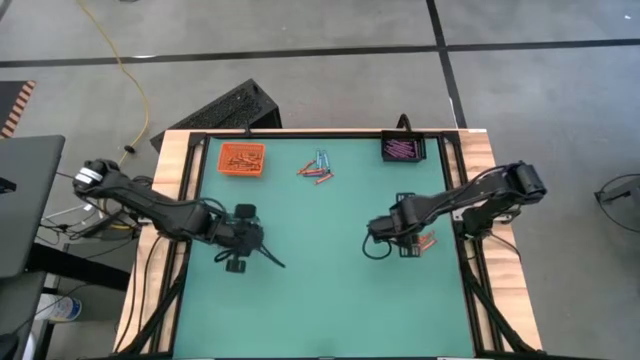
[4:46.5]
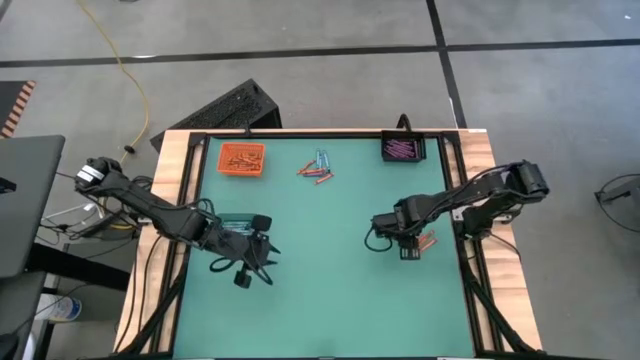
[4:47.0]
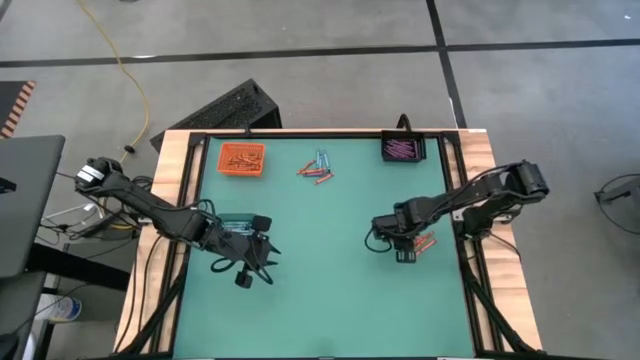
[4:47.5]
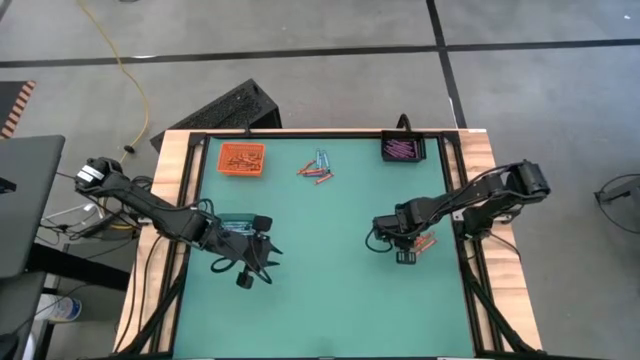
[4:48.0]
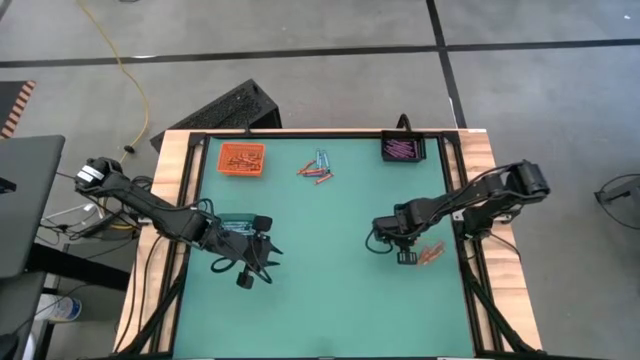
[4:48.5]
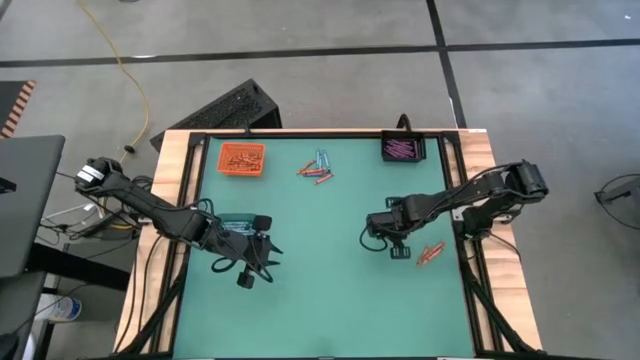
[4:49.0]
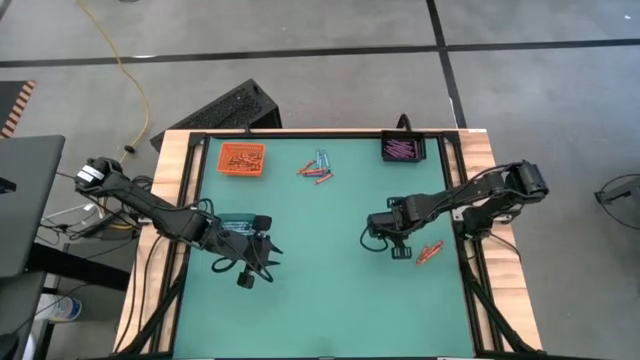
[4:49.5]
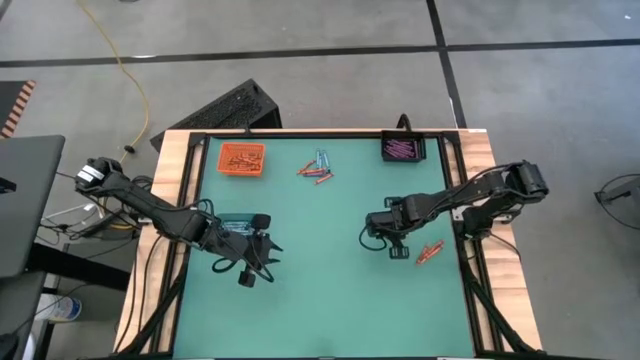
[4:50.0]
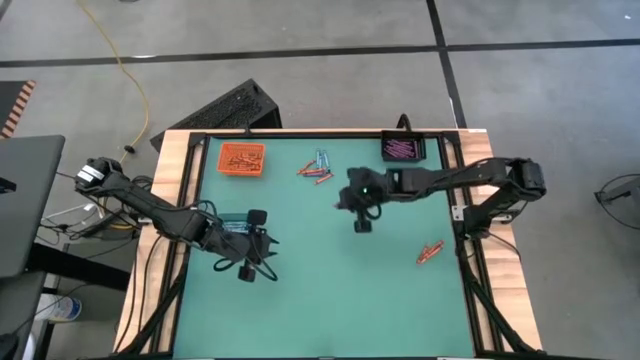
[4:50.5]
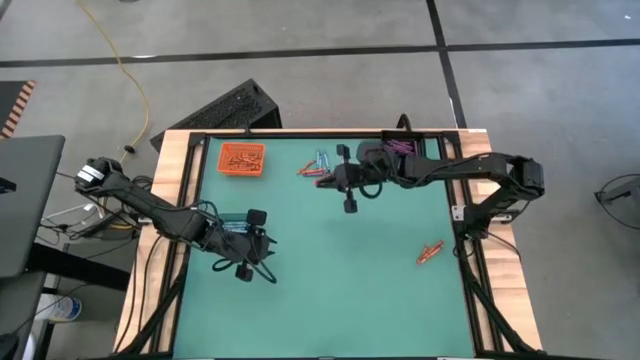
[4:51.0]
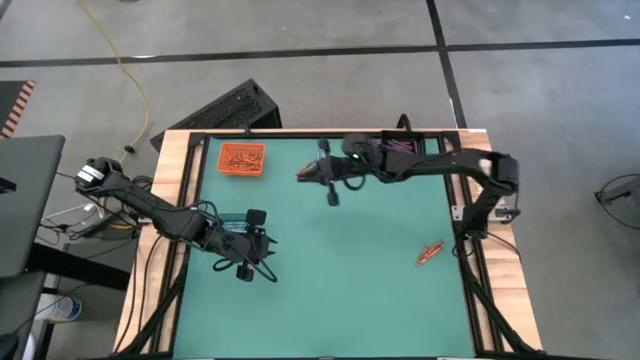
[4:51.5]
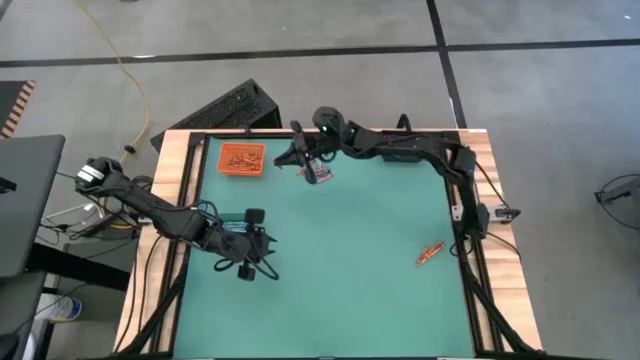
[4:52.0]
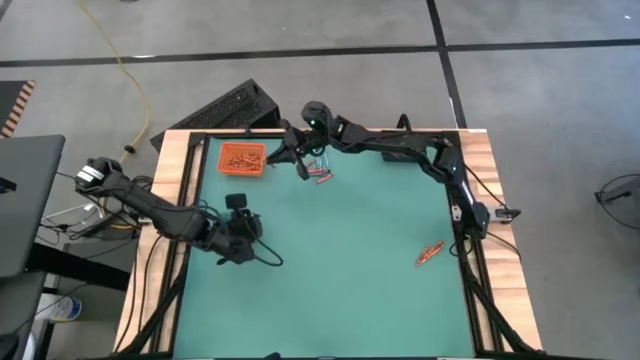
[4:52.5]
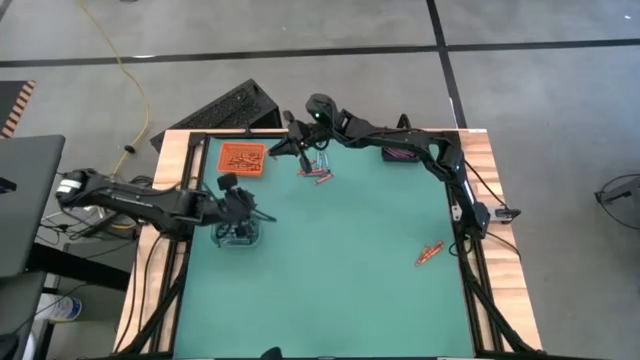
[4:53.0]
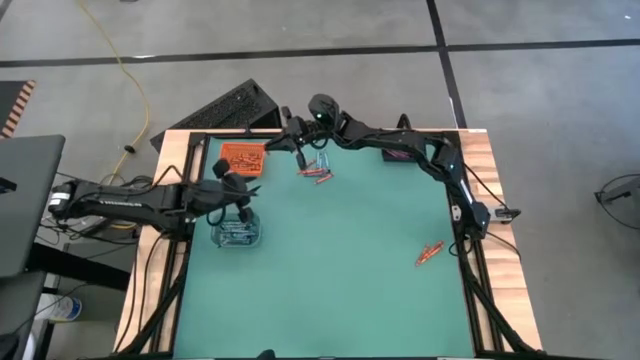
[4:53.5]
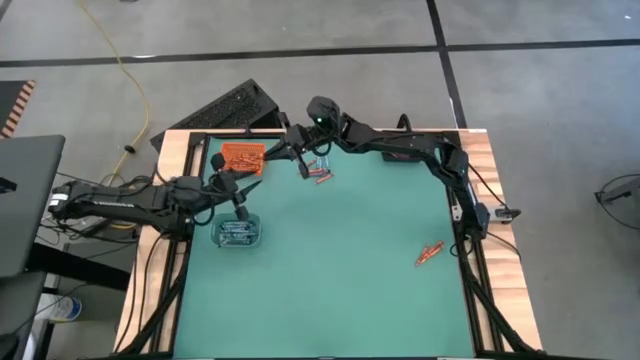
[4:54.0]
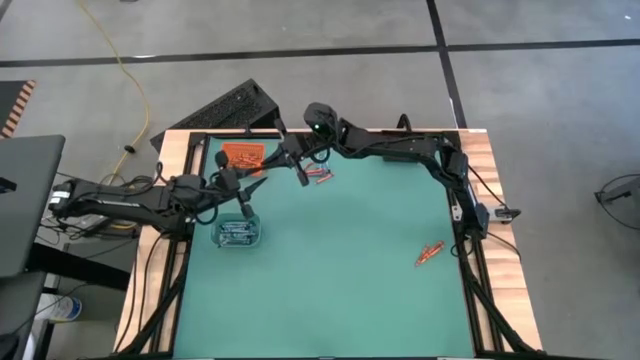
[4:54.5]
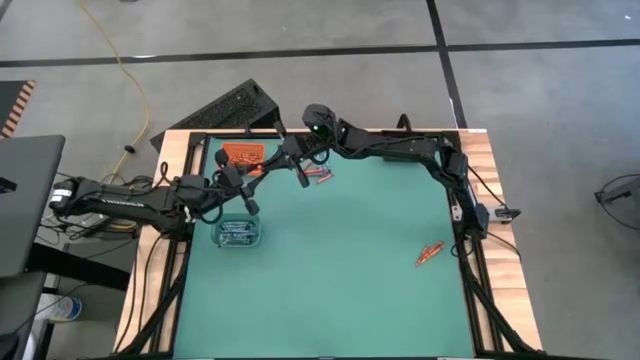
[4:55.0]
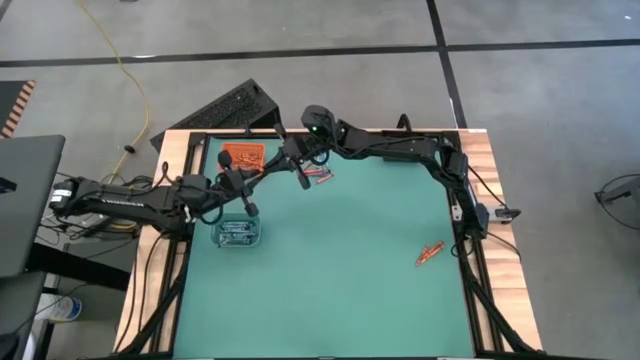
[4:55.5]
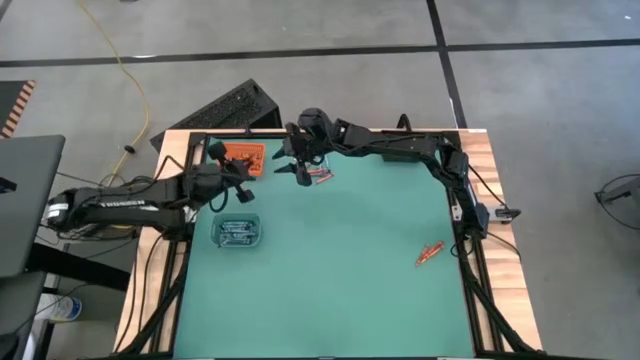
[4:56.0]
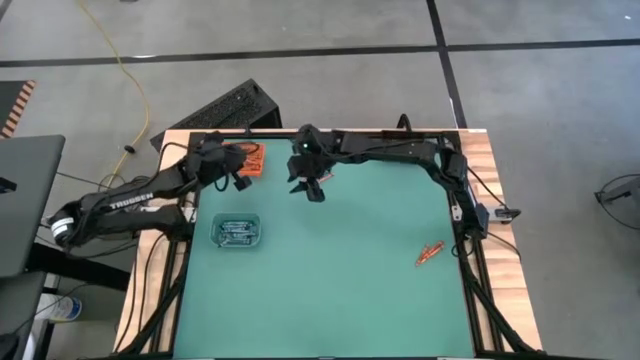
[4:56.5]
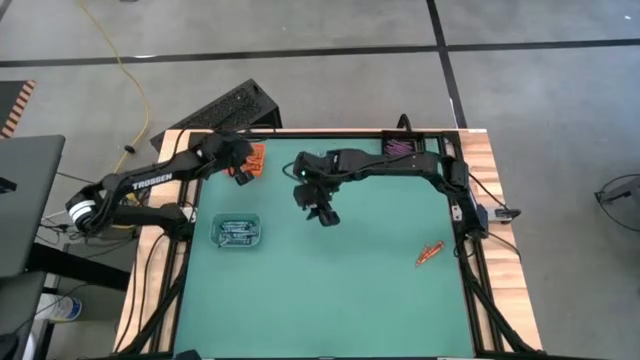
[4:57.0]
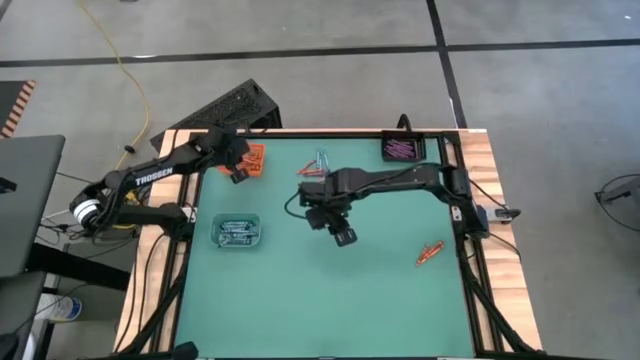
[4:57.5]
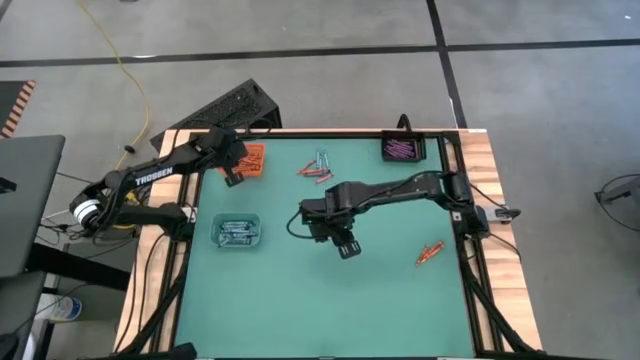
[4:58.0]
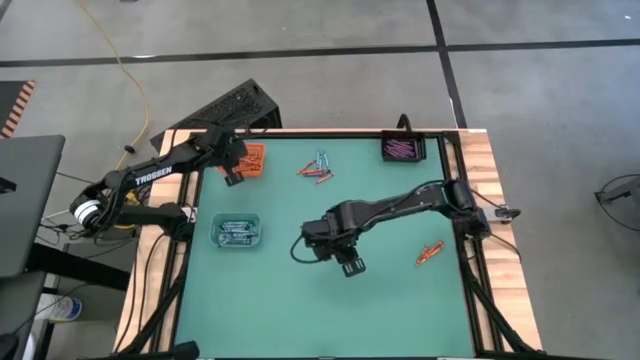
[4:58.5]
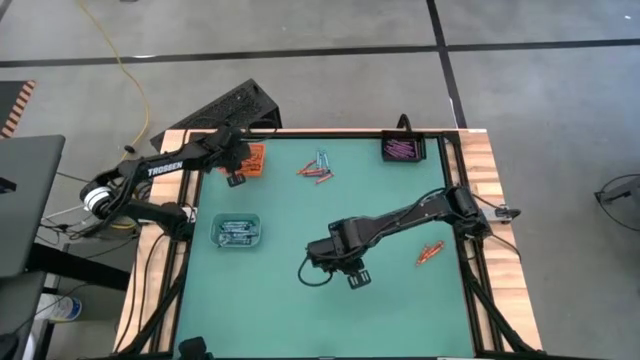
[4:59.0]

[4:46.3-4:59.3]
Task: Sort crayons
Put the orange crayon into the orange basket

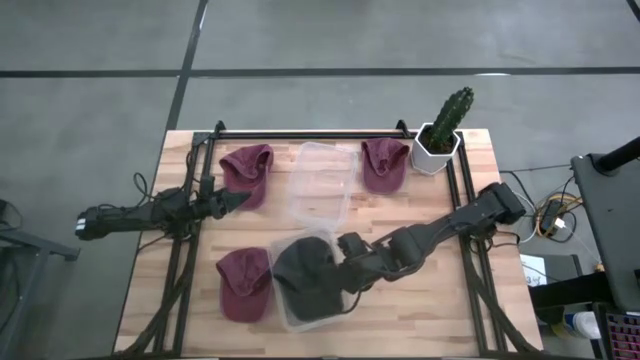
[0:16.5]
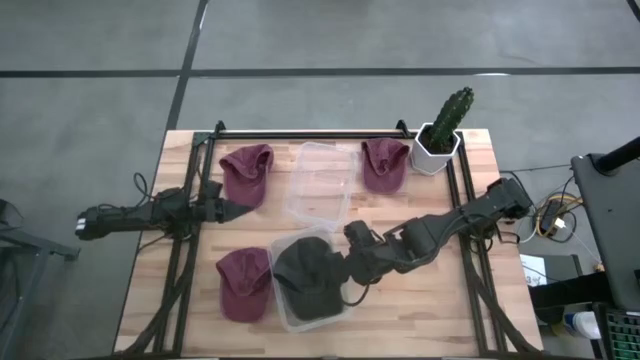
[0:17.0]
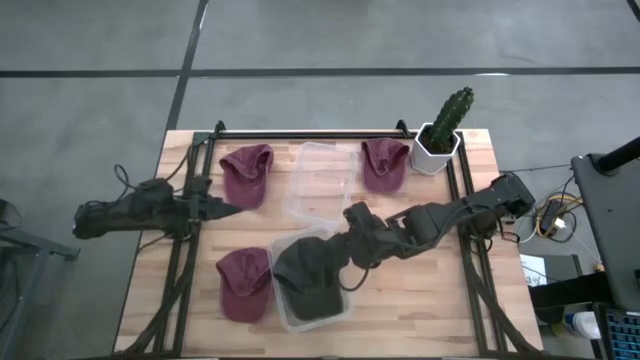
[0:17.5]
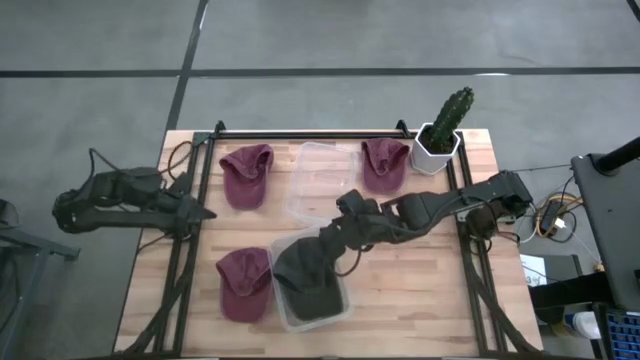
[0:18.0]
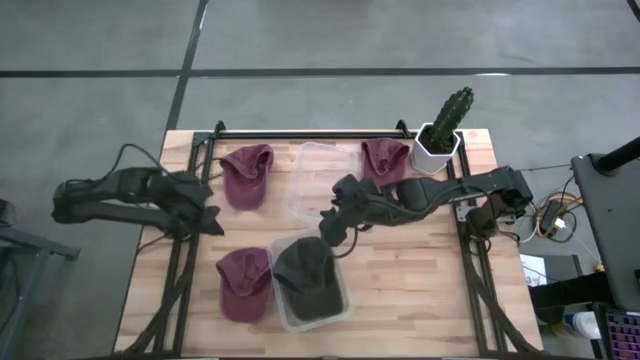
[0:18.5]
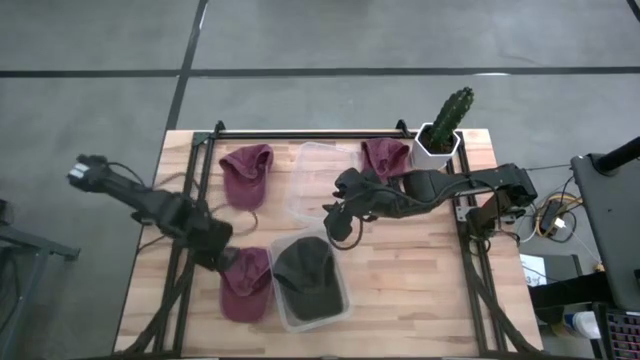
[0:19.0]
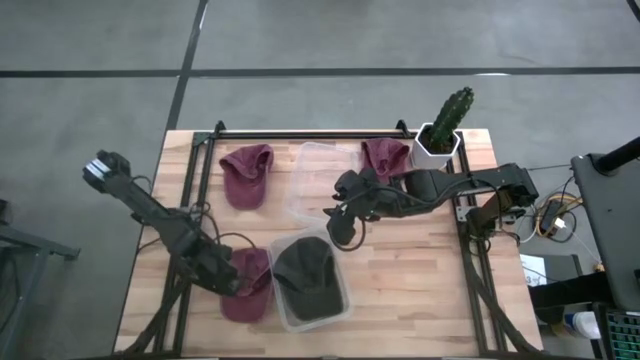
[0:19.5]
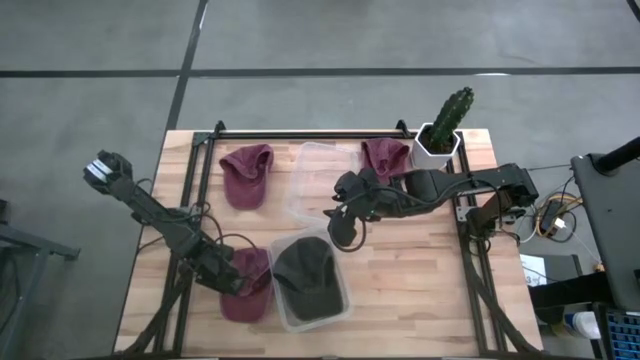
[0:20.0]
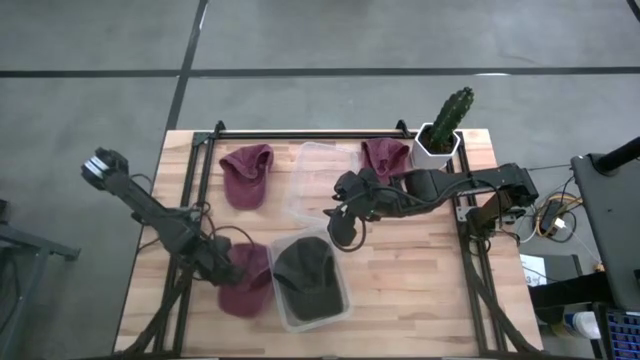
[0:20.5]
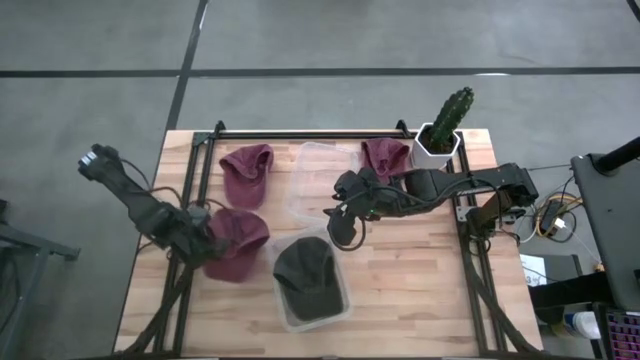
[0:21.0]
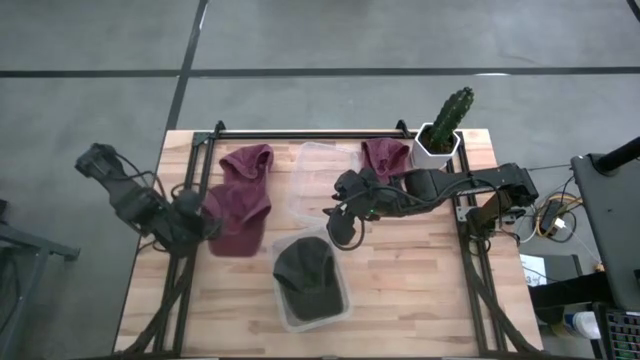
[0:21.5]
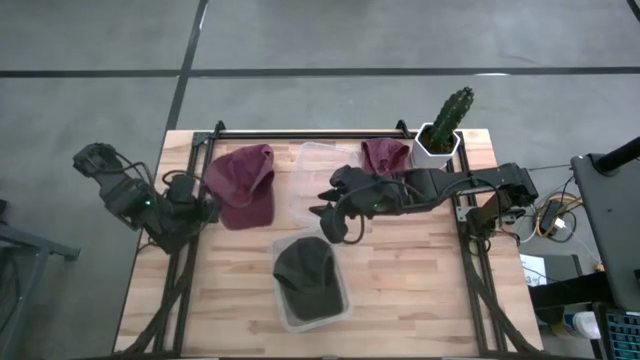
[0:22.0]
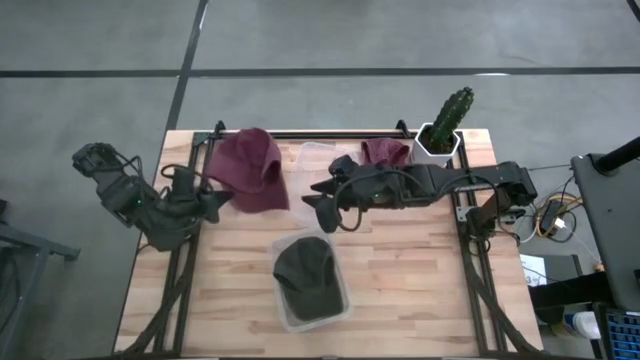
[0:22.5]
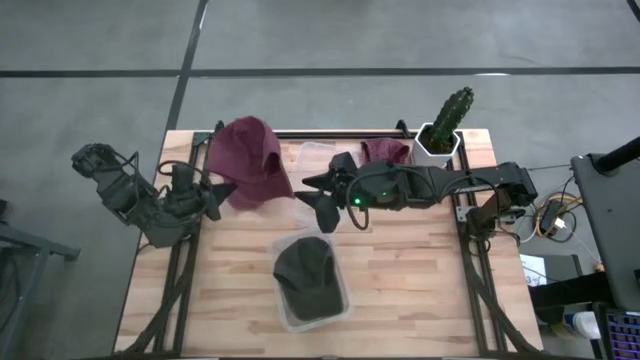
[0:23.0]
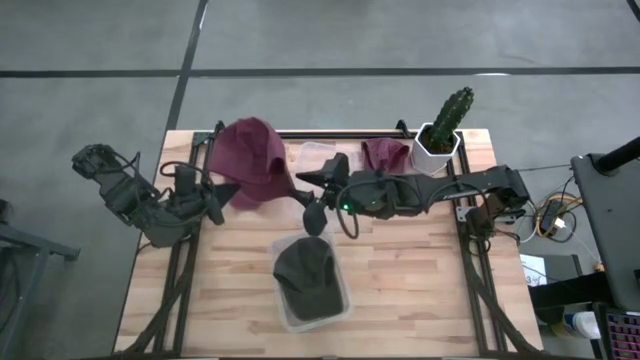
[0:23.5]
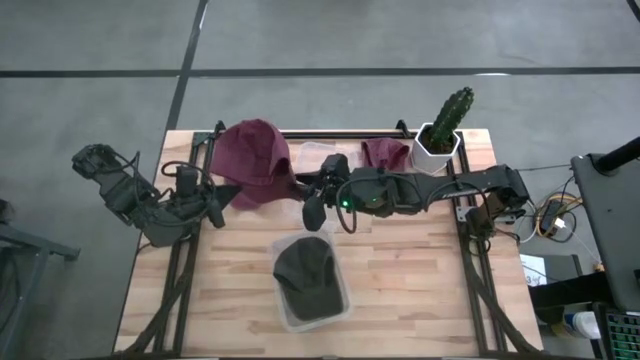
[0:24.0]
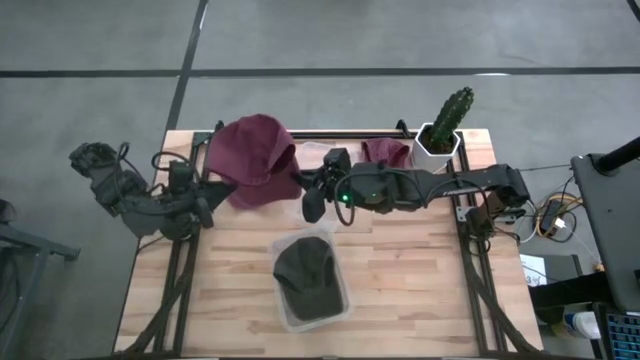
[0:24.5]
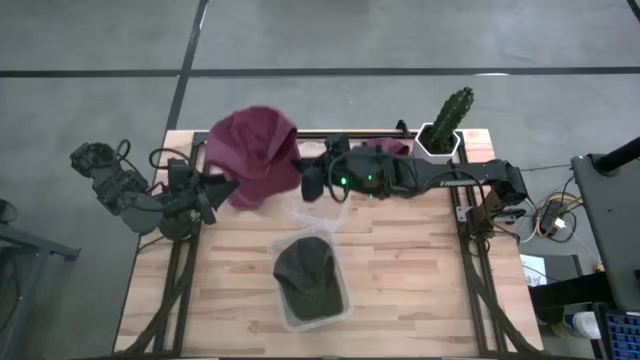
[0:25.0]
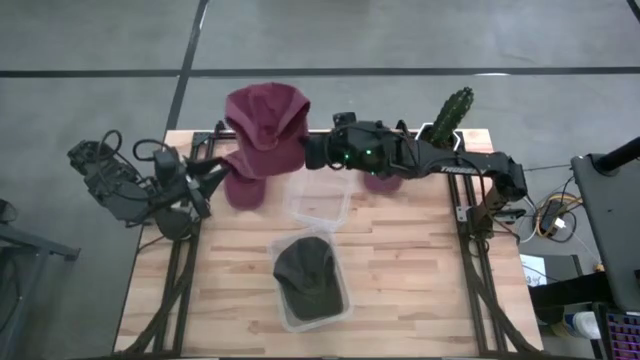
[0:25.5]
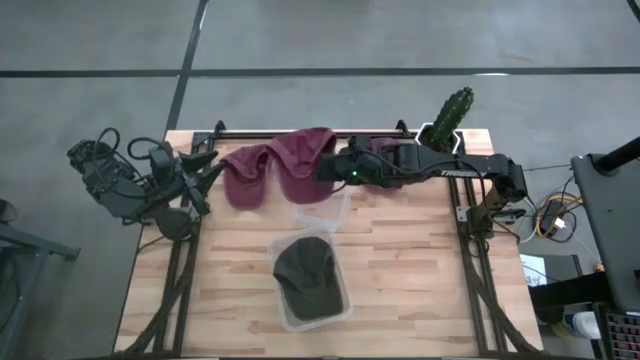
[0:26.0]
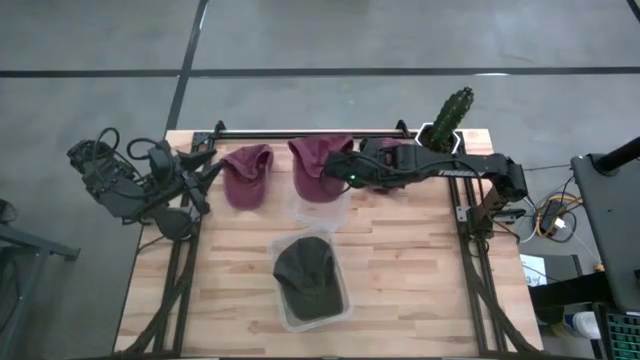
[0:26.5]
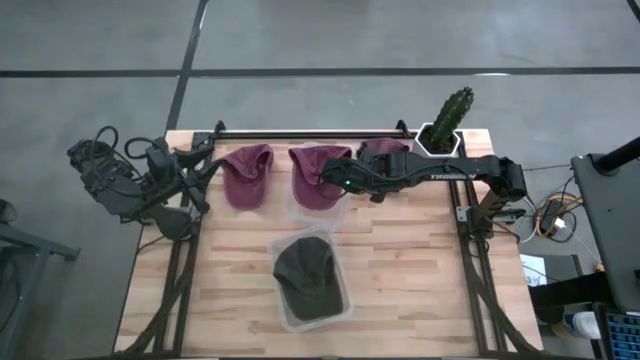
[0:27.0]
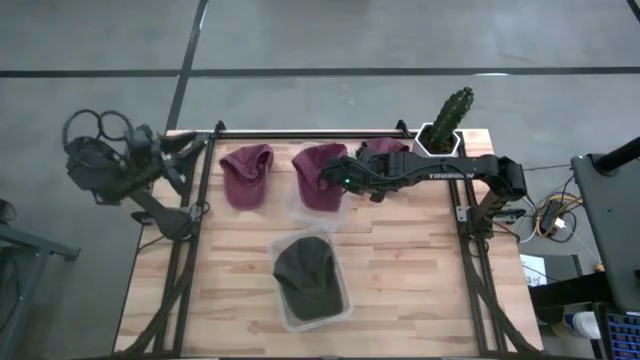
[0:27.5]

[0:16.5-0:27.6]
Task: Pick & Place hat
Put the bottom red cap into the top transparent bin
